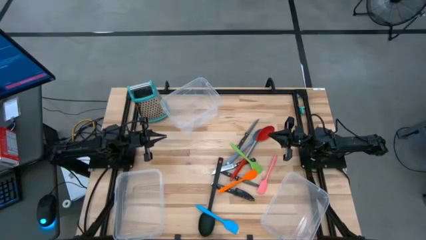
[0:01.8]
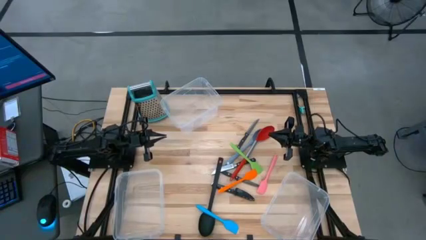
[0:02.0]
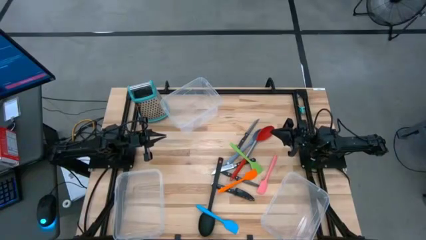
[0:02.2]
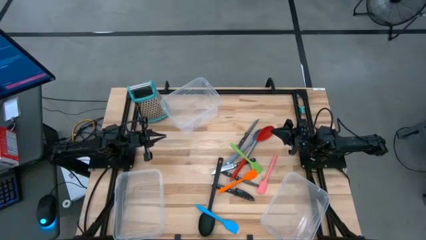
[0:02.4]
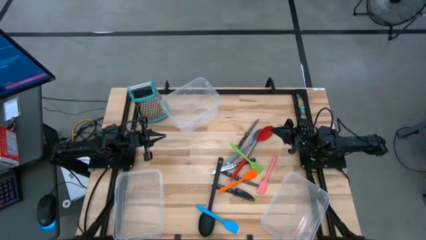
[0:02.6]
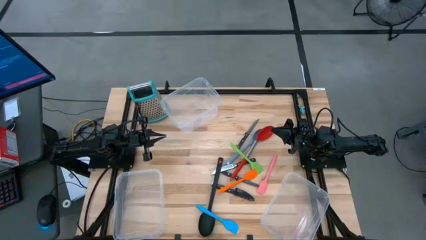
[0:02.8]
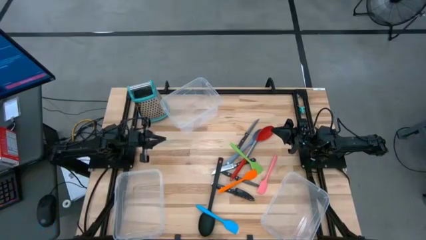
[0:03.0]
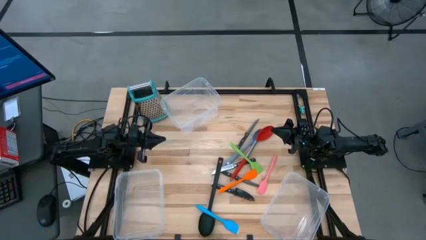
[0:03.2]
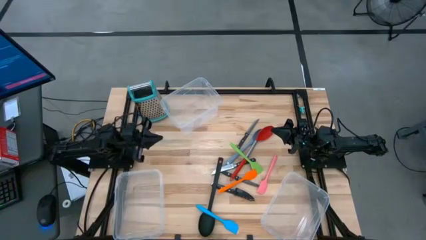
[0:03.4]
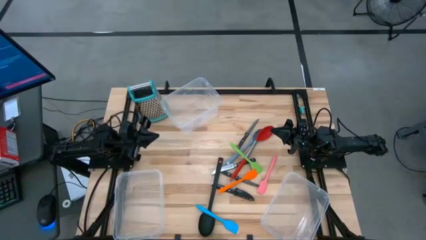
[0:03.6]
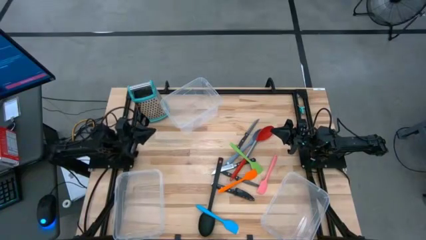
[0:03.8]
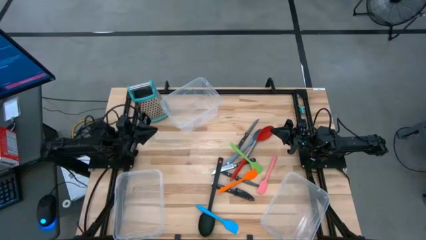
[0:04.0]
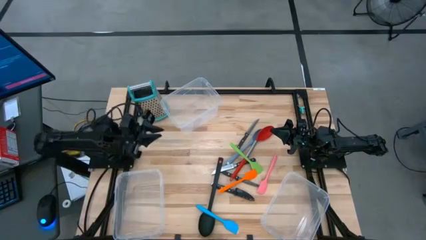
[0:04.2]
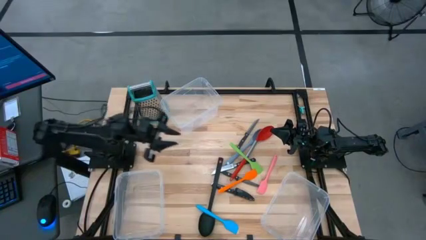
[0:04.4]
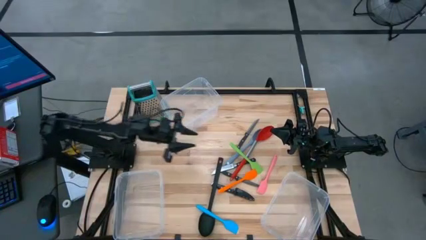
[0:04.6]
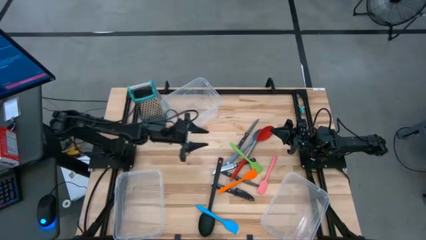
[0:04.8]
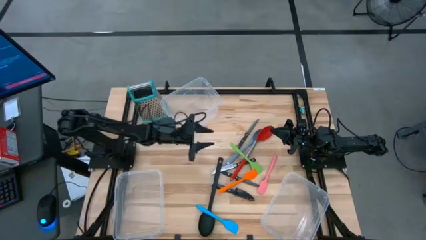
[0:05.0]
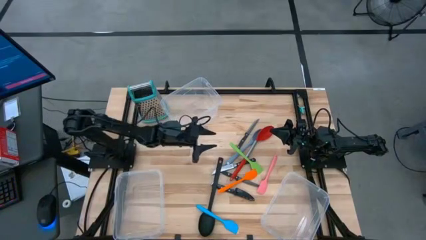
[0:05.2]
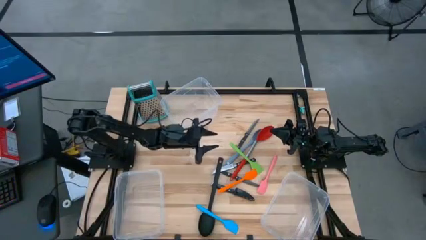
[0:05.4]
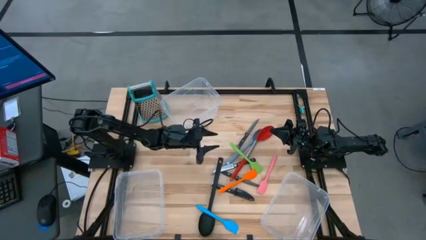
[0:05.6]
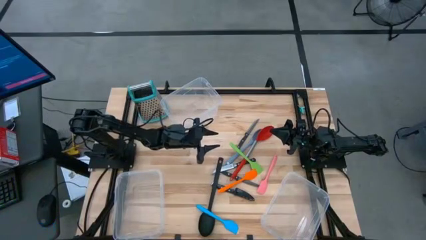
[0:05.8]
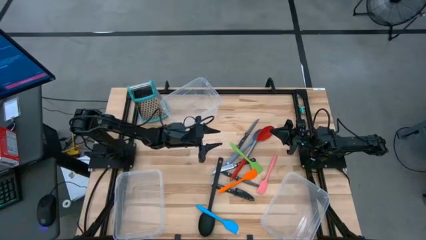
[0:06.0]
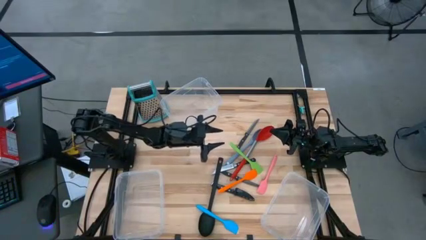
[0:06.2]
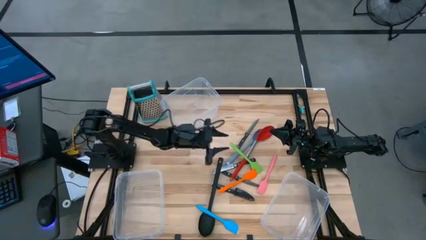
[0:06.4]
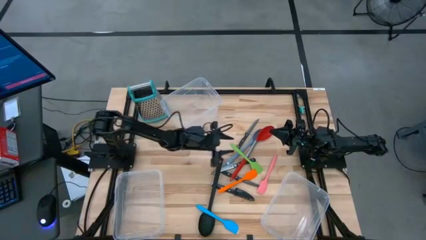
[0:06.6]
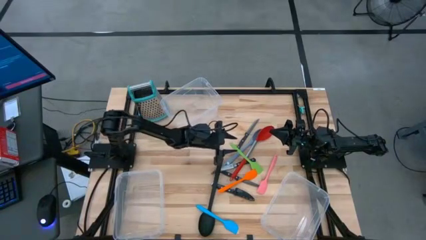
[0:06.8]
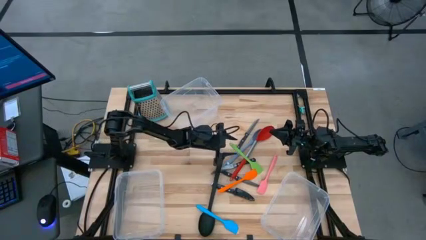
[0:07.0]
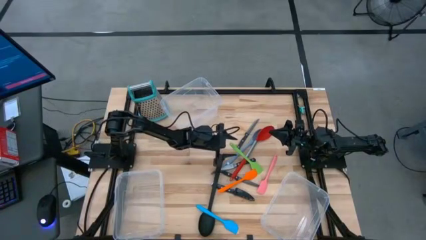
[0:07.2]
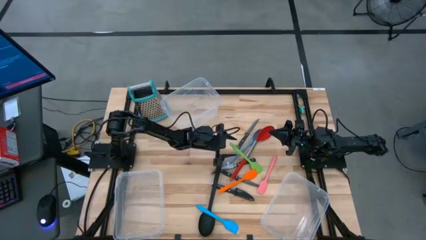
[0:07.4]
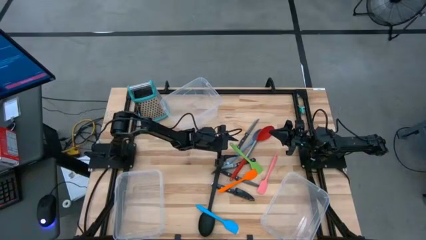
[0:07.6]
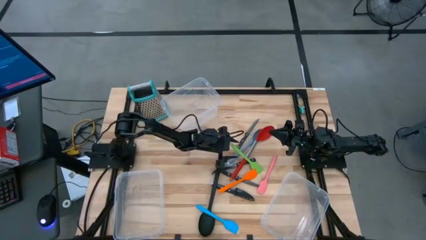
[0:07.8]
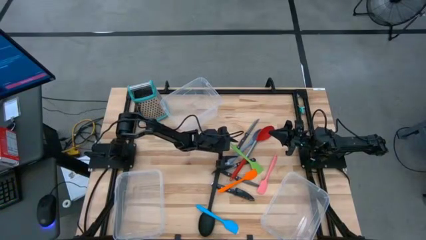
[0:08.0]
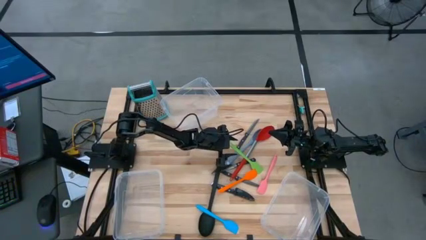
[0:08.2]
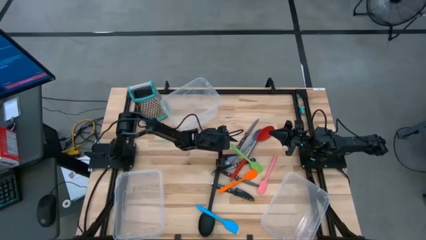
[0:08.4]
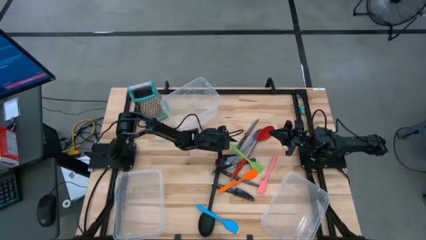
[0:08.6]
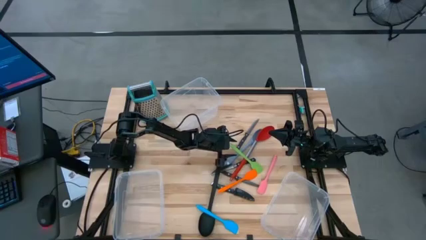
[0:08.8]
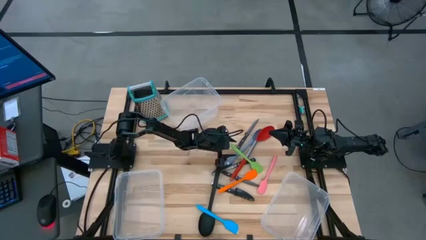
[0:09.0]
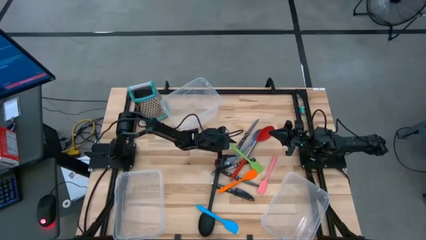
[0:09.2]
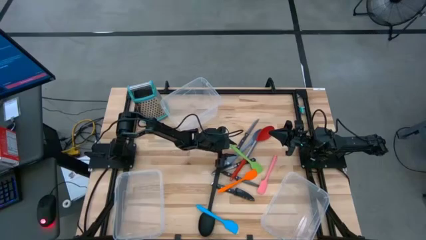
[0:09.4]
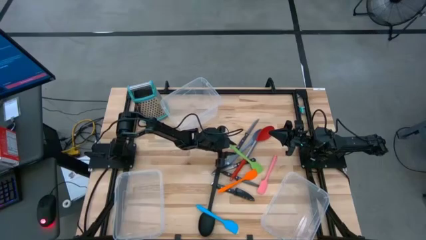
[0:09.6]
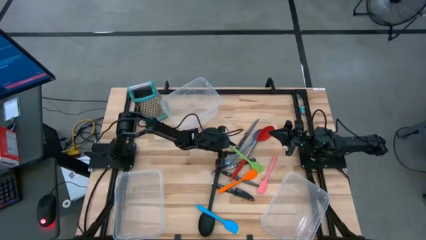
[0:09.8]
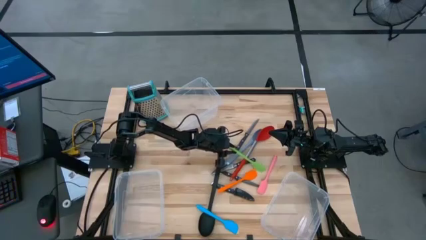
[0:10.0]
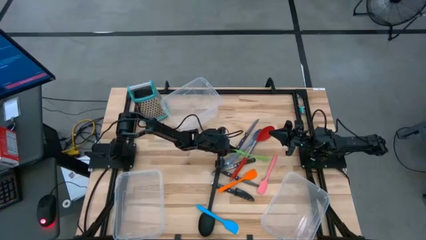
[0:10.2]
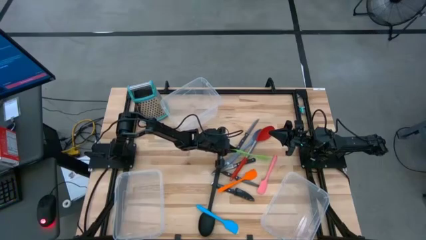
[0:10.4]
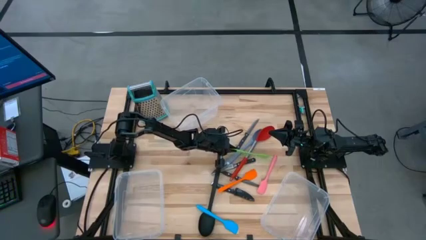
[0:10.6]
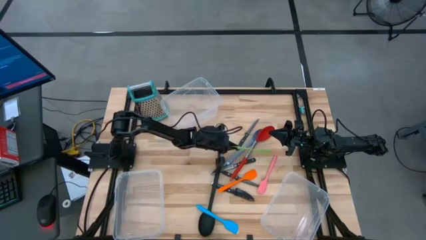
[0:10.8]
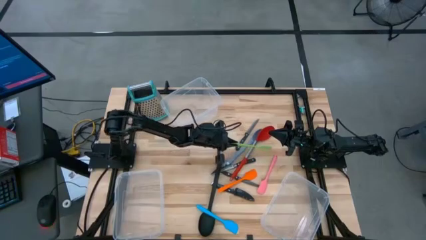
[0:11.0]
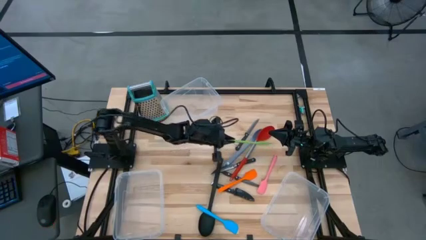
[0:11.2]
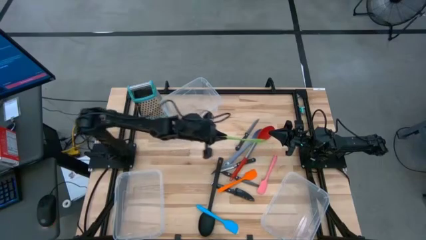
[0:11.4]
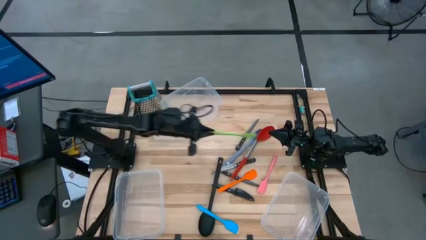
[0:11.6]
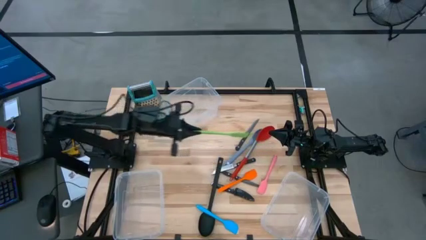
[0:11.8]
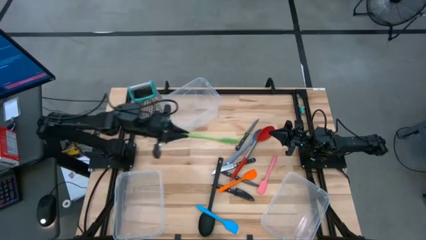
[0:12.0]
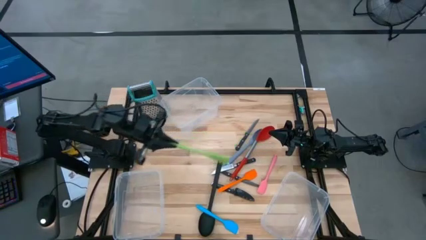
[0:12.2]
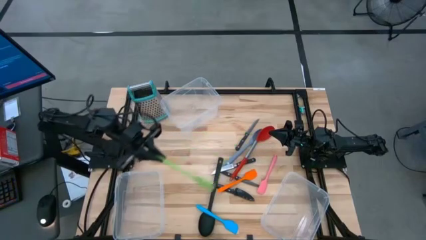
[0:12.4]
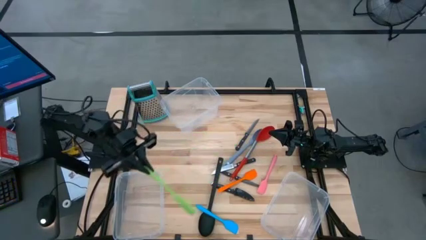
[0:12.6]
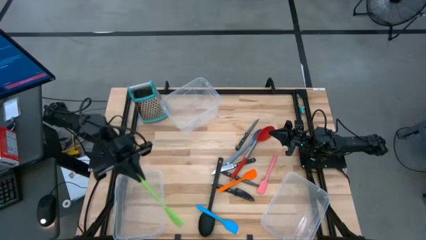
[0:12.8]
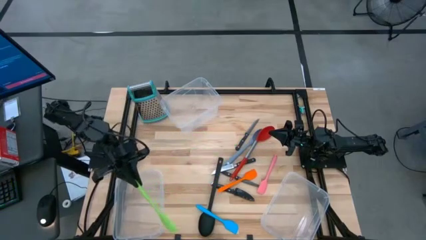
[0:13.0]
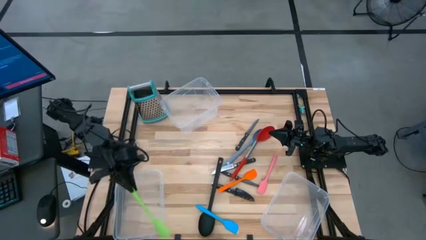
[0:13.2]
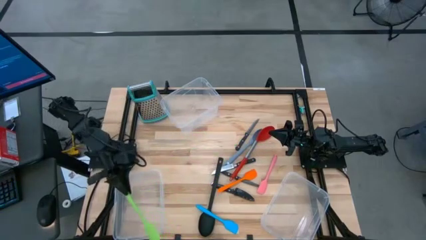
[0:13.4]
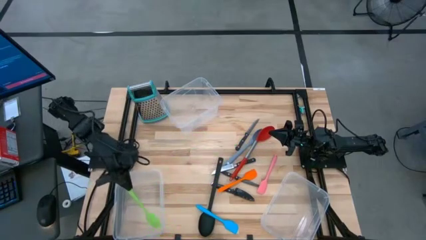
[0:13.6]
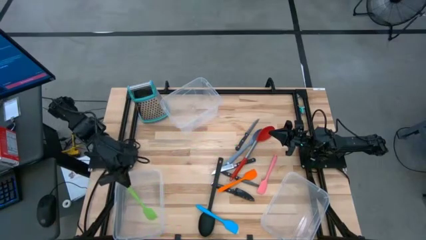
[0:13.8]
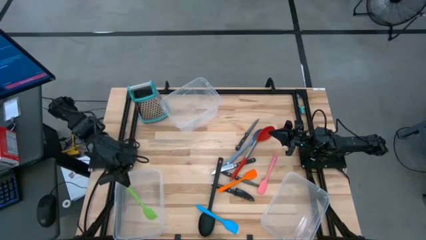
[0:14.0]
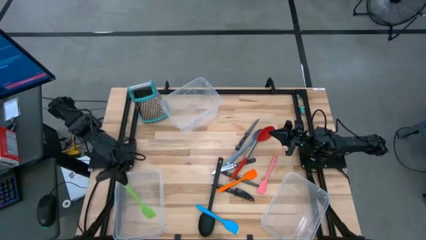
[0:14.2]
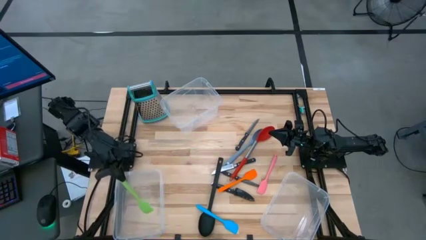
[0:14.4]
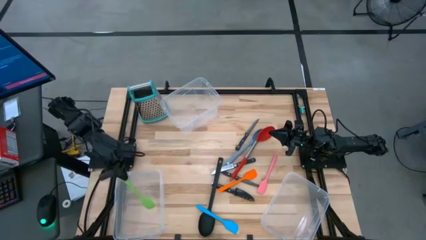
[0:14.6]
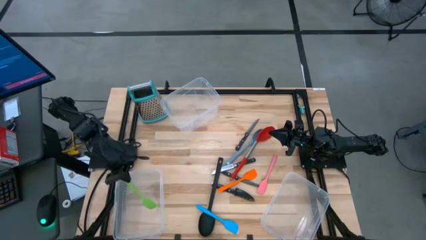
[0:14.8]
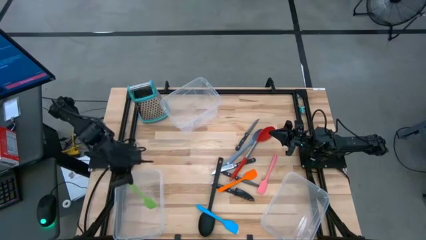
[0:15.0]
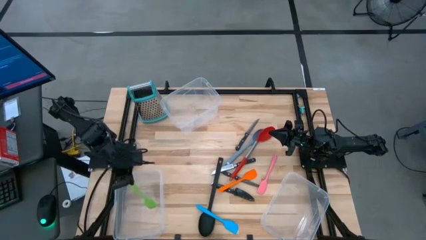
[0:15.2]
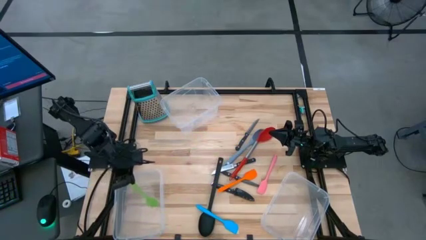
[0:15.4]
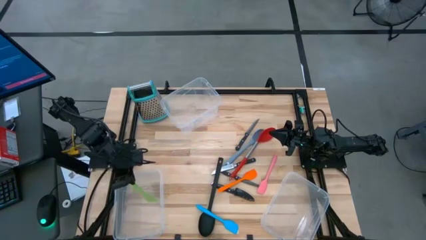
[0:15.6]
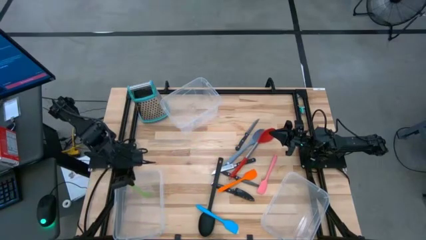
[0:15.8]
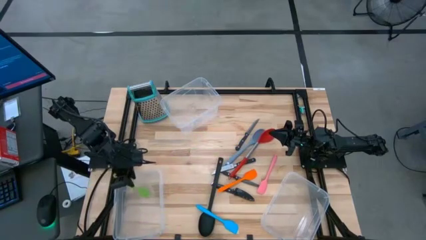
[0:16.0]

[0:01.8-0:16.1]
Task: Pick & Place Kitchen Items
Put the green spatula into the bottom left transparent bin

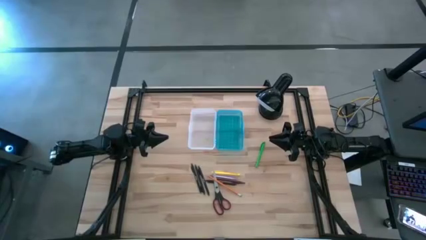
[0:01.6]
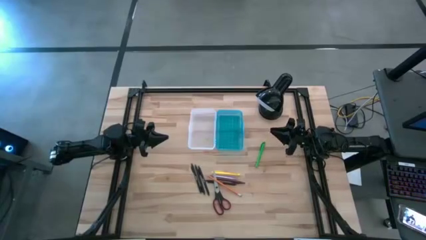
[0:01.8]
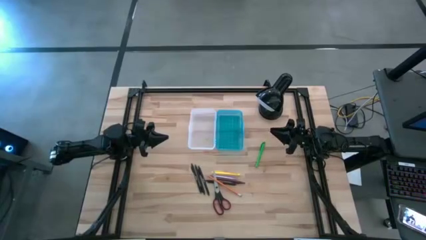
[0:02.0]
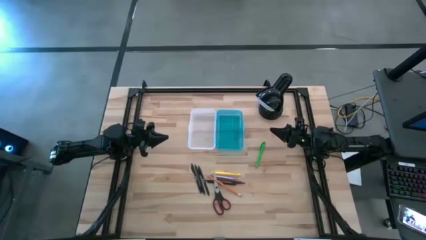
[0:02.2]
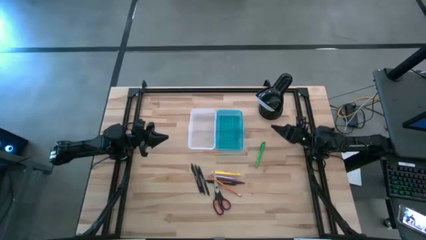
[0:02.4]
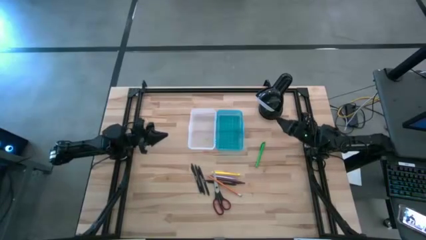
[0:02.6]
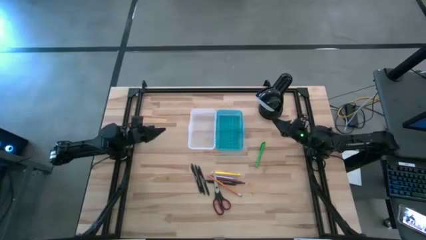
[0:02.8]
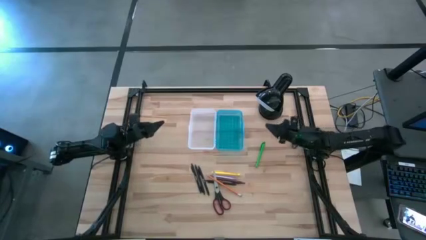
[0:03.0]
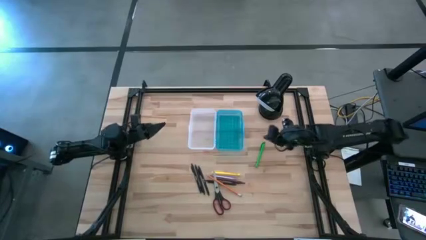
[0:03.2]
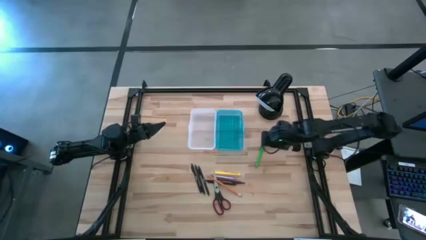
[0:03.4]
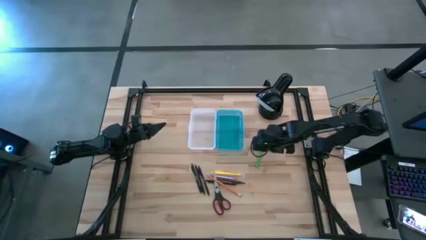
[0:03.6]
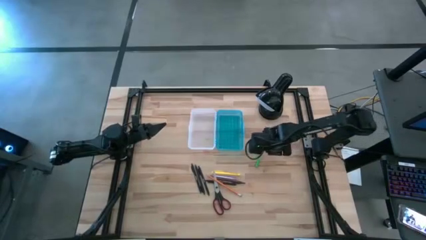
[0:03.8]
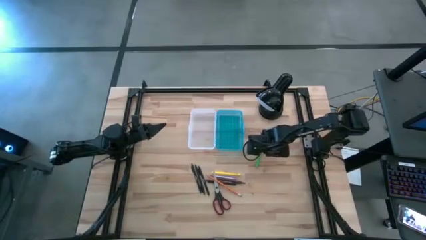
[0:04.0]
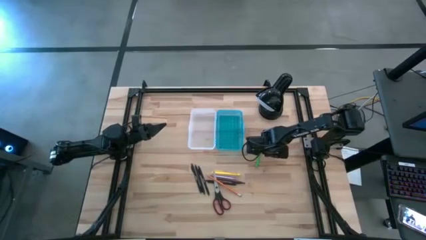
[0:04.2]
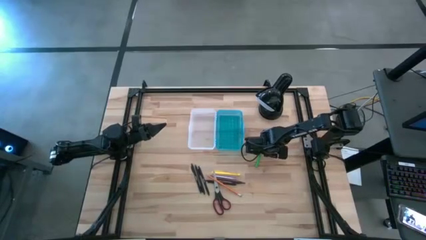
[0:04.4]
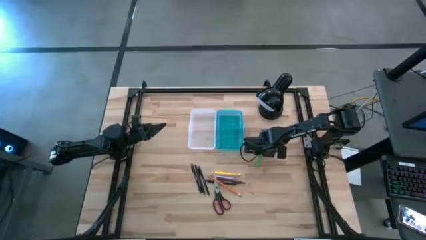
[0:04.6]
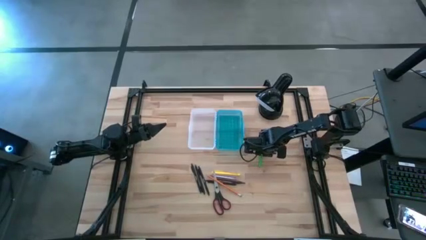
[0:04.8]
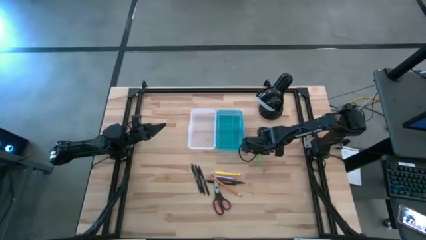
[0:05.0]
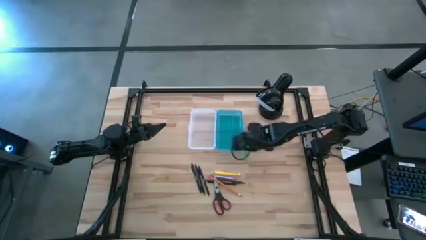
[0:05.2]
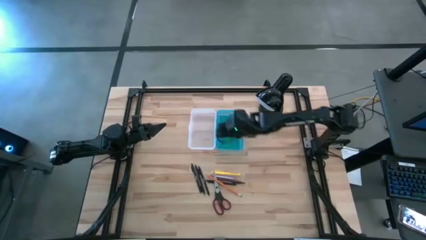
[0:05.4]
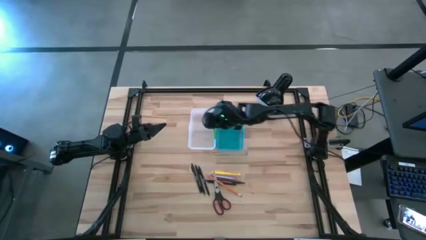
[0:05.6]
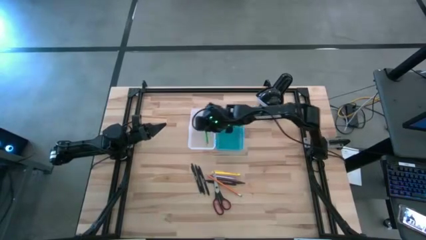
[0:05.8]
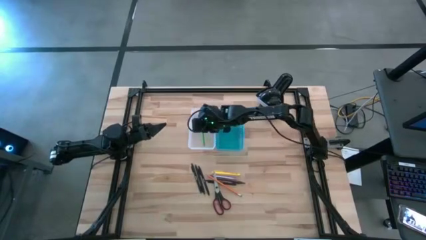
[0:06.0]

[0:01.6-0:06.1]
Task: Pick & place school supplies into a supply box
Put the green pen into the blue supply box
